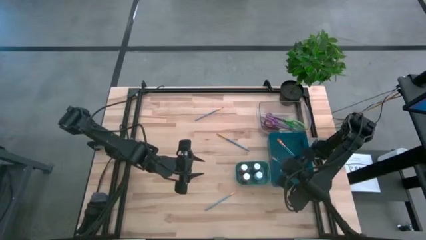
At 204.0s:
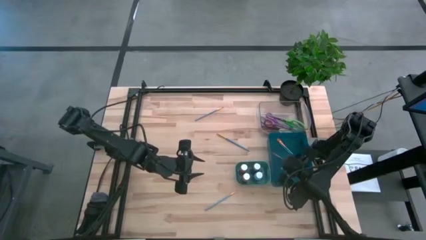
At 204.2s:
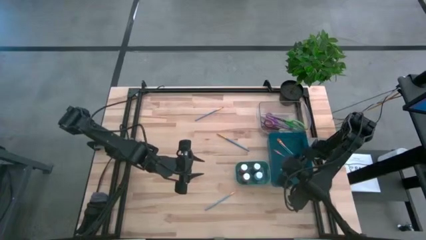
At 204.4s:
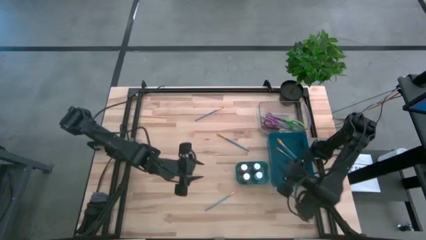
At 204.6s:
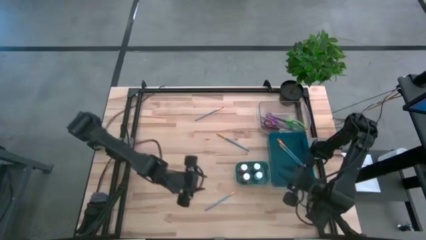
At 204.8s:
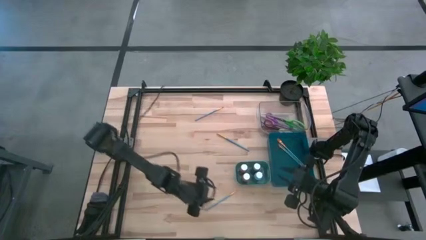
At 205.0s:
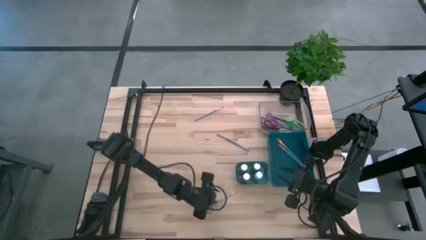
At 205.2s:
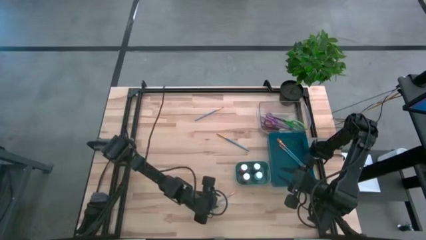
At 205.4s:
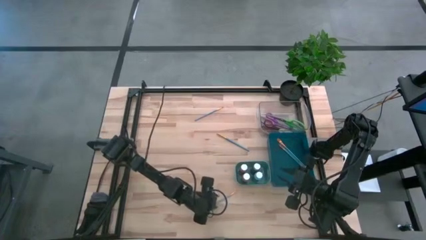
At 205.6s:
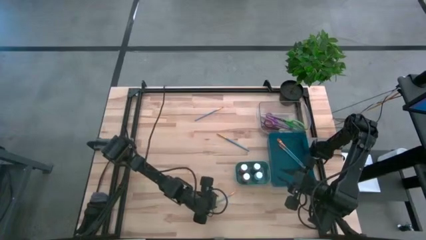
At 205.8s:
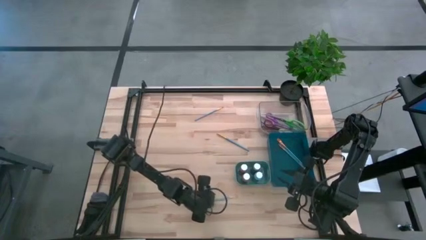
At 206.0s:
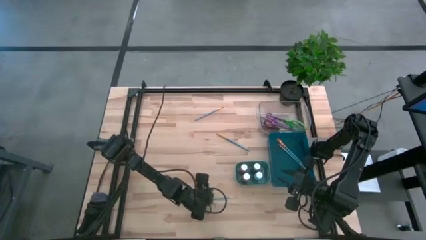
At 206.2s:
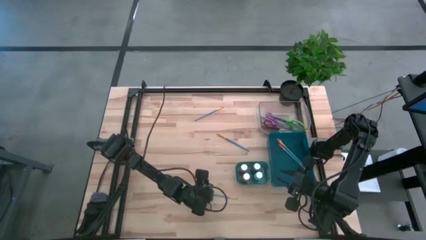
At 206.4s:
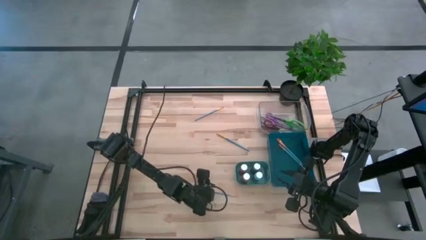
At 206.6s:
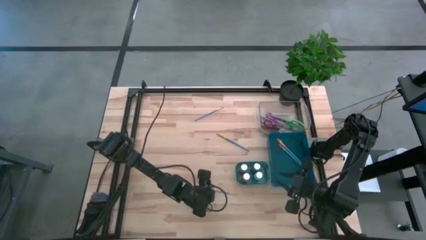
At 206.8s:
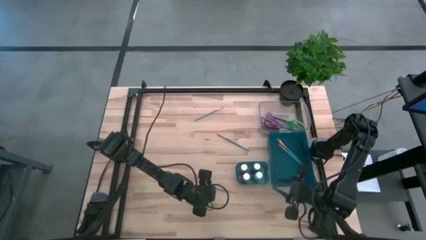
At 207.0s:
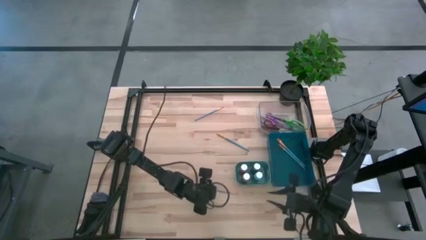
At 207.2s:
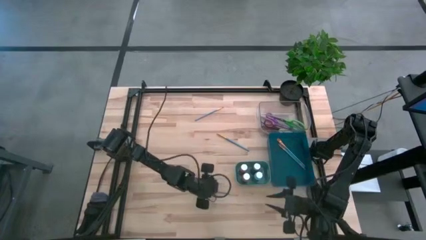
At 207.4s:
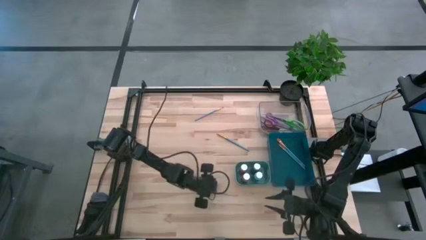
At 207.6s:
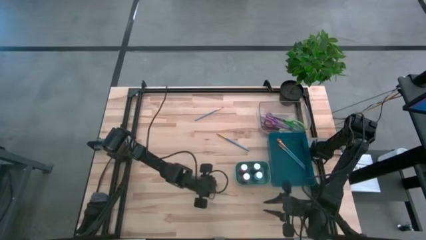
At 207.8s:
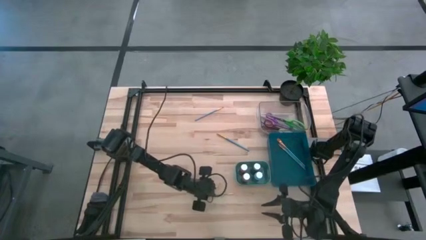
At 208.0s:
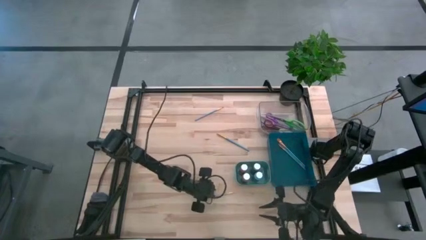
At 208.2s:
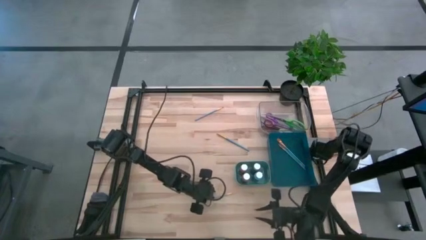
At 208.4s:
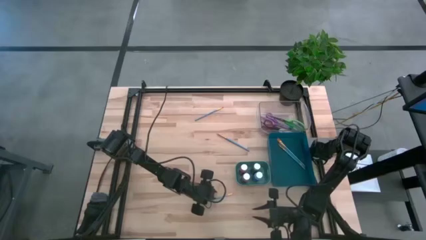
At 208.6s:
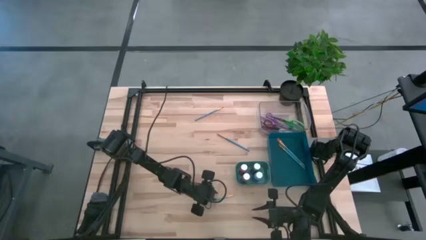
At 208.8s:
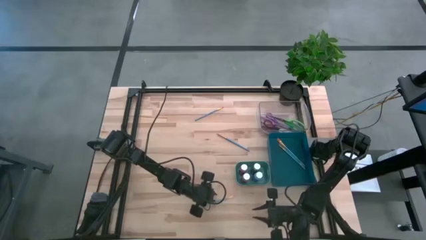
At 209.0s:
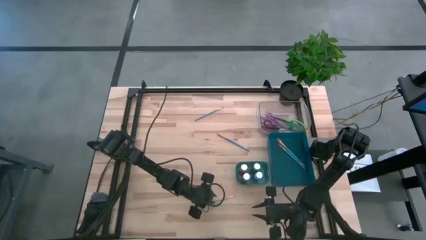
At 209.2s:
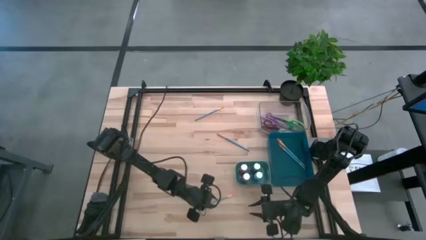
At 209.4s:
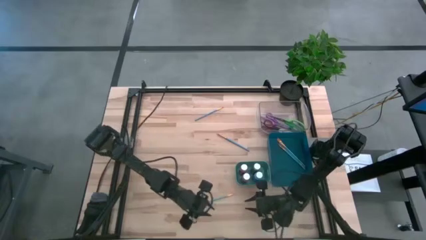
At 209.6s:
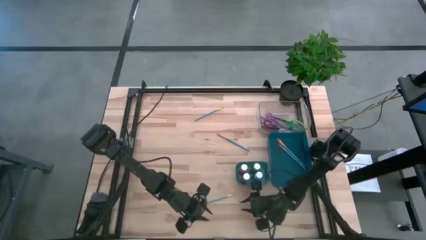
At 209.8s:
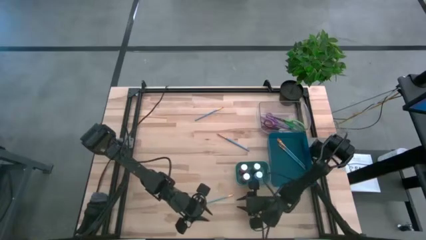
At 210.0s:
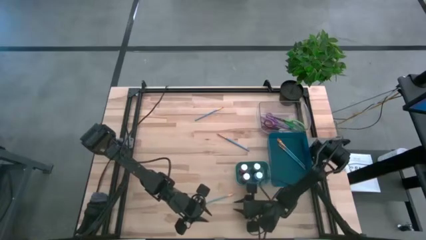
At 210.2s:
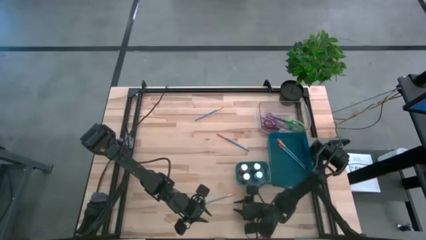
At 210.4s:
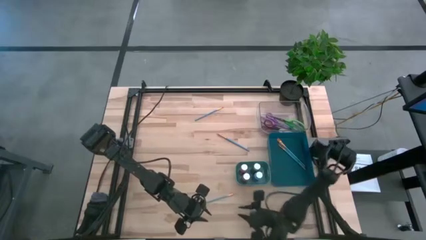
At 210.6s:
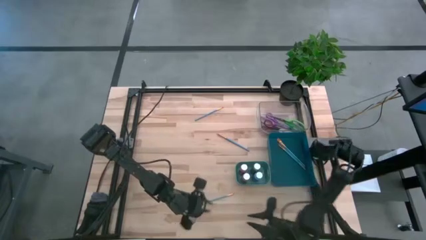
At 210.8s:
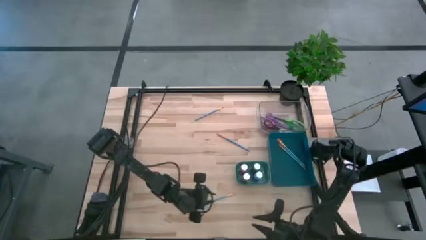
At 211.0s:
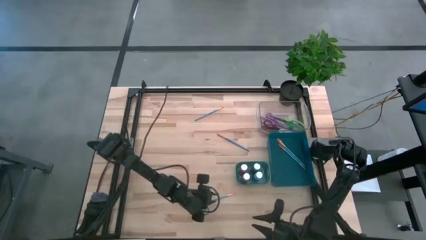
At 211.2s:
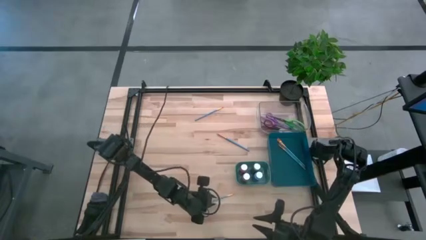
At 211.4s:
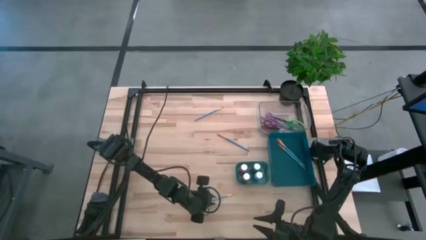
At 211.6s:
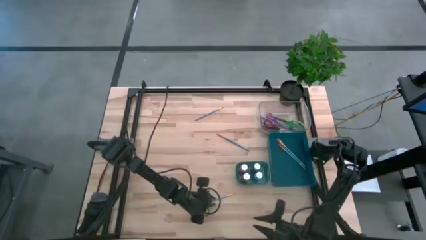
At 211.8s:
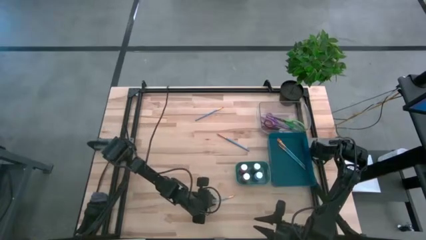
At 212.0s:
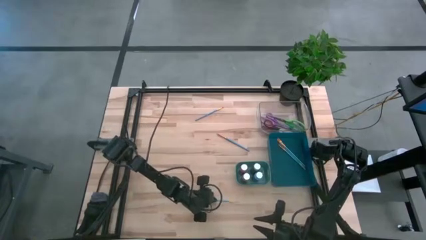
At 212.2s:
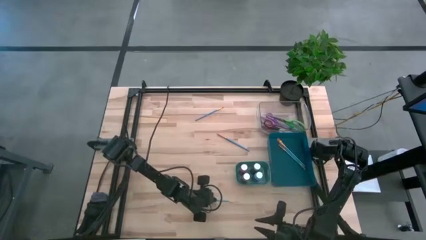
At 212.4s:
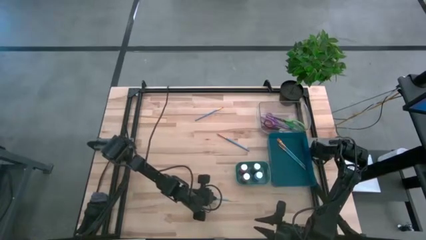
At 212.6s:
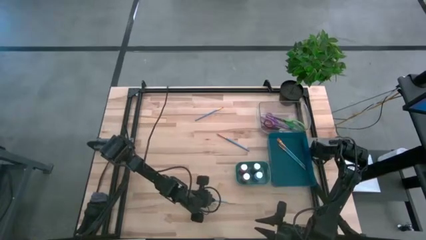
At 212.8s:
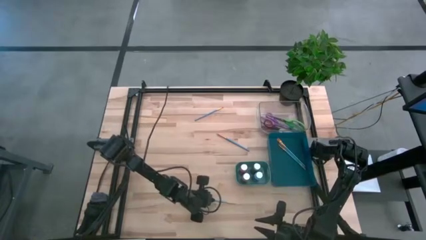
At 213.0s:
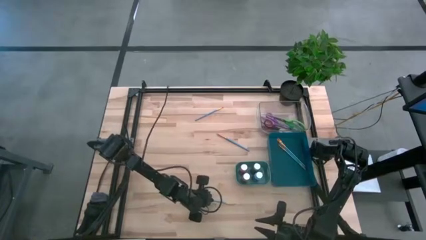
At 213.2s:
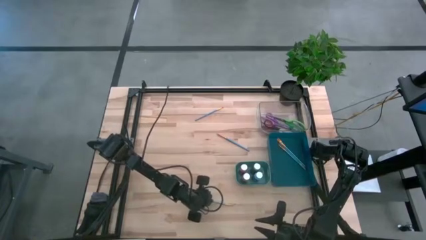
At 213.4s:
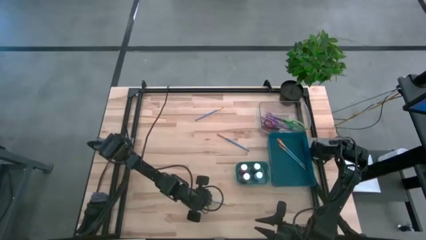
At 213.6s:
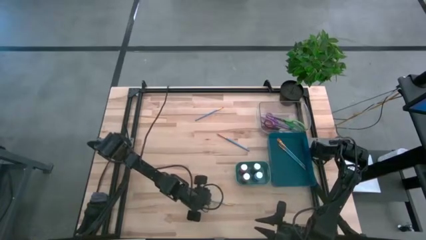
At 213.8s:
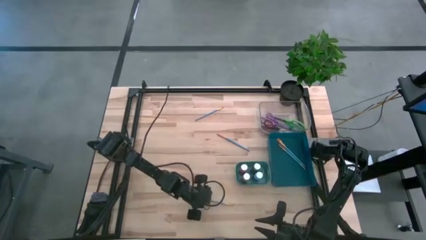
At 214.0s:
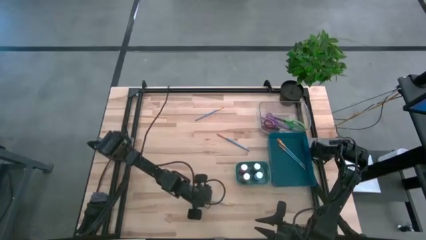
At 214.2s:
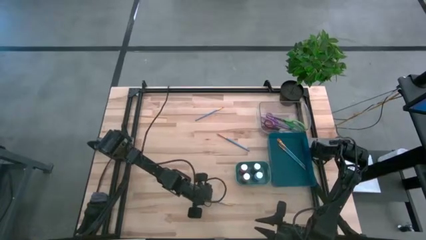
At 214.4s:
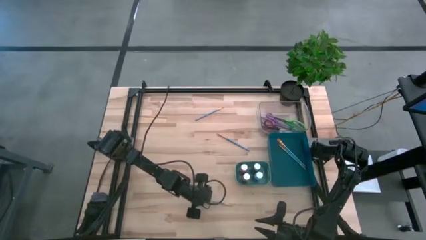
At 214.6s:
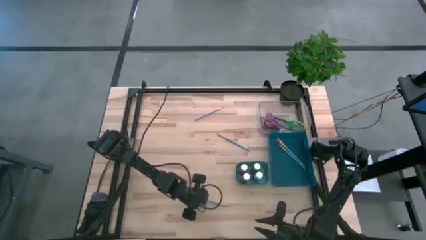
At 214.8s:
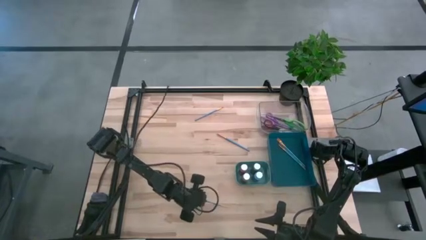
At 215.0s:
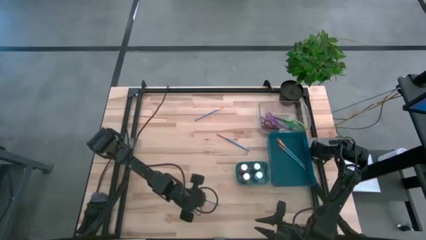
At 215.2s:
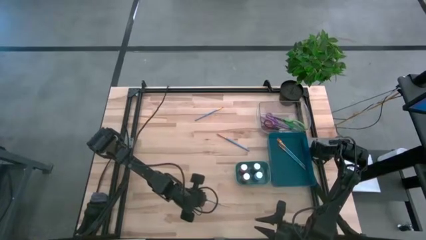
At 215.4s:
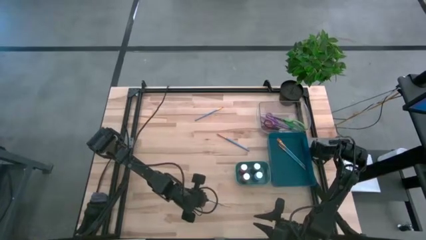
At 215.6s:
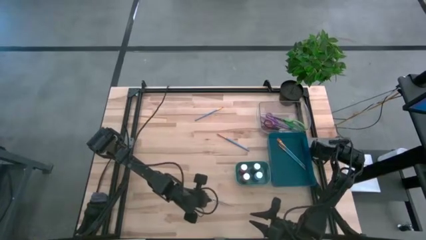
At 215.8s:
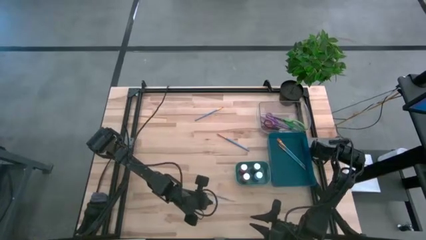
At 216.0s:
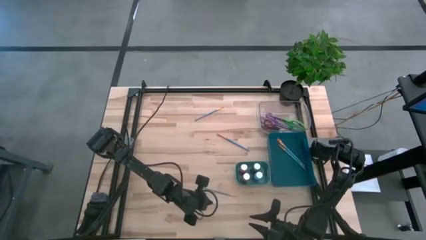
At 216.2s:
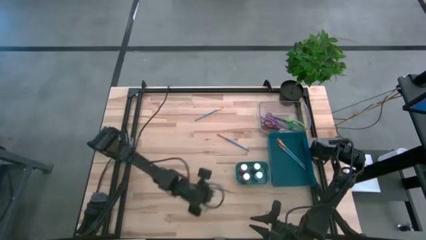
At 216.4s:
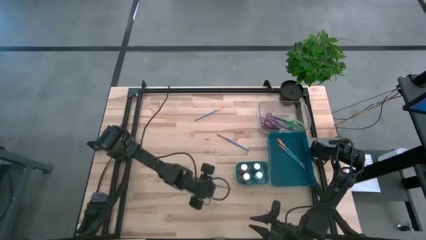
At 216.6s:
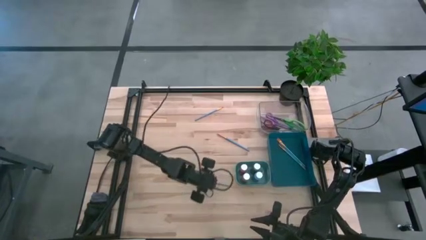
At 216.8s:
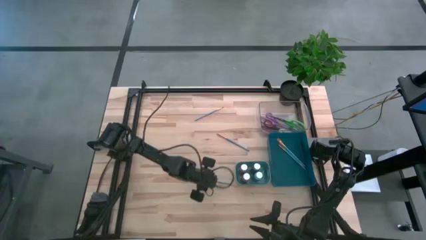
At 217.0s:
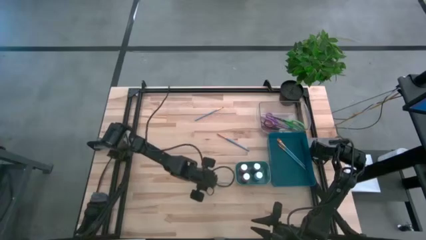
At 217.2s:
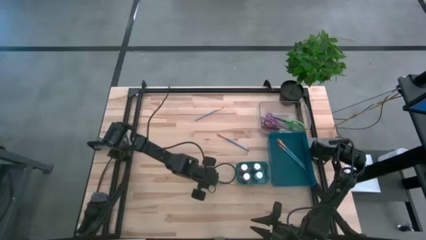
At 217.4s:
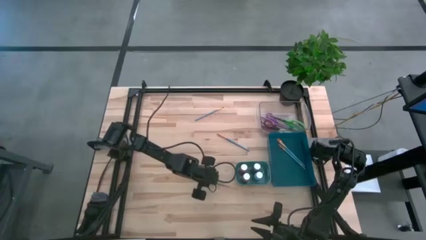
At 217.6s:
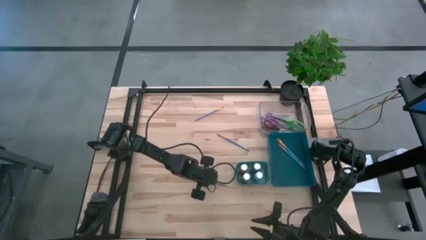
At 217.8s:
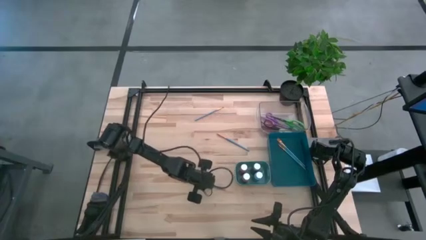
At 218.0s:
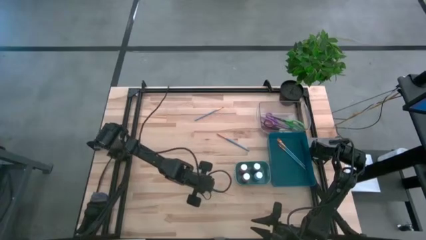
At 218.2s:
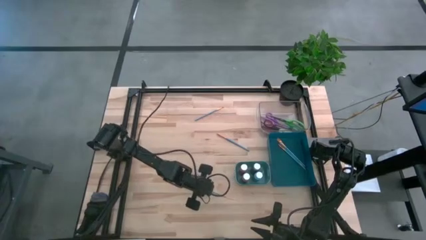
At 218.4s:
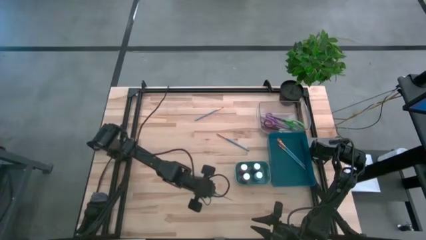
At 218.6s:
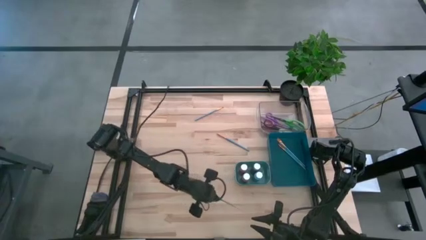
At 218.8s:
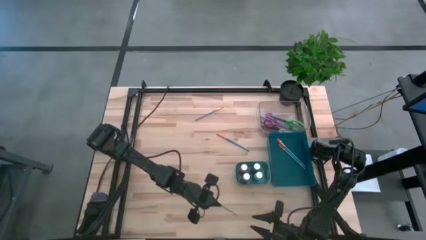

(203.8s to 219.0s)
Task: Pick & Place Paint Supplies
Put the blue paintbrush into the blue bin

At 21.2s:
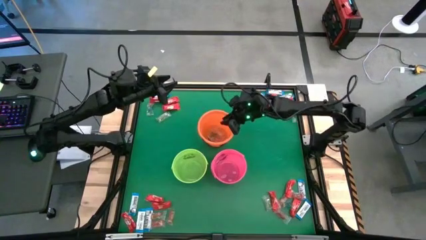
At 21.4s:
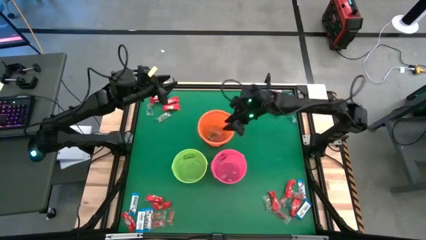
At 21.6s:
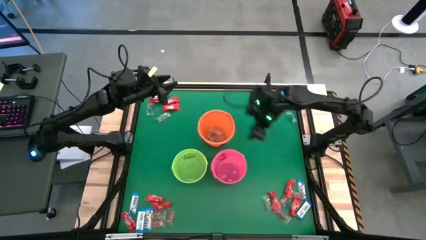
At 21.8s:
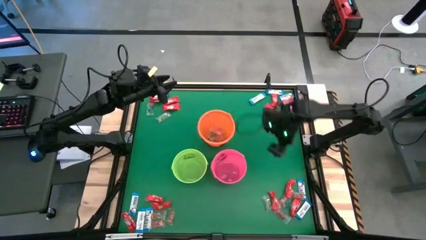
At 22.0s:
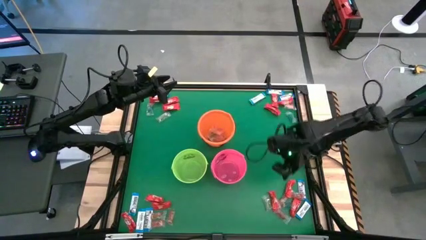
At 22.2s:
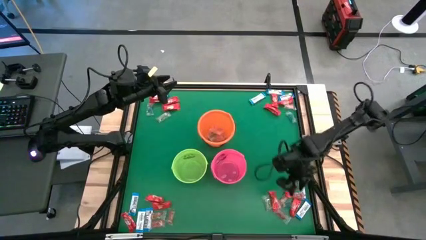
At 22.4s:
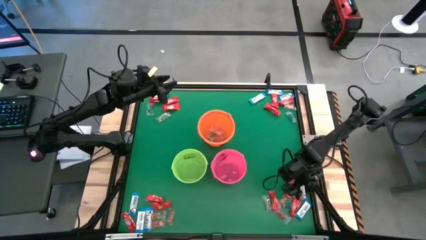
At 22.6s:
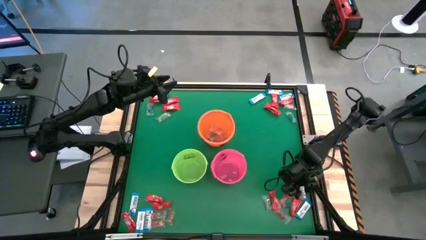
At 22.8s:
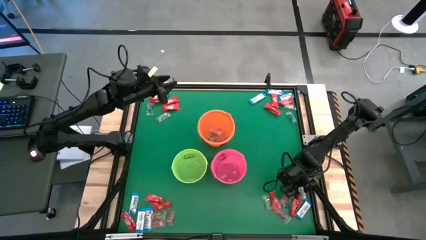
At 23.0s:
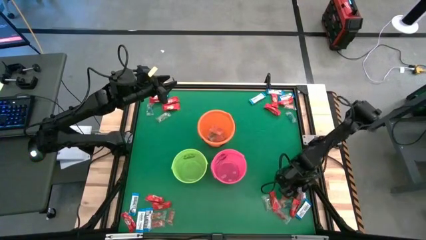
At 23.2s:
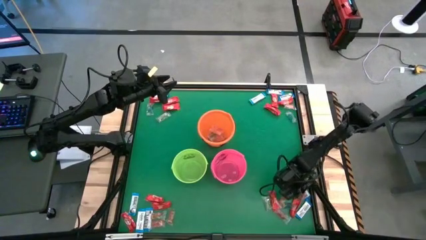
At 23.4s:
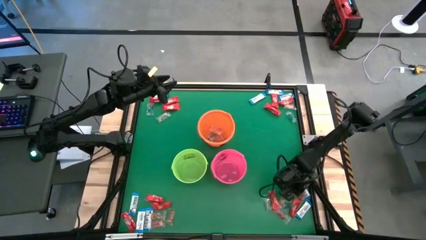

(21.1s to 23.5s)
Task: Sort candy by brand, put in halloween buckets
Put the orange gummy into the orange bucket
